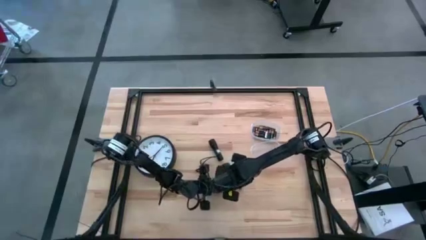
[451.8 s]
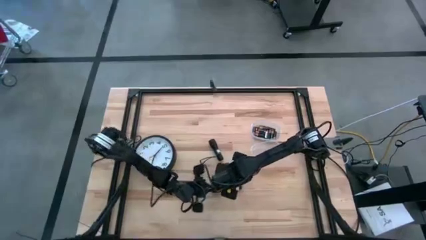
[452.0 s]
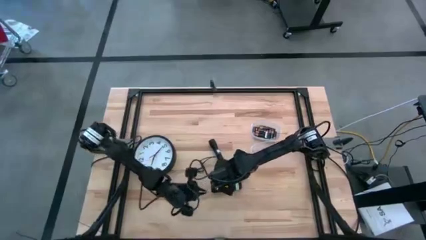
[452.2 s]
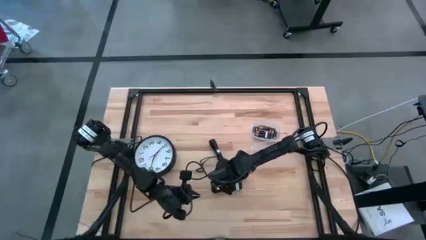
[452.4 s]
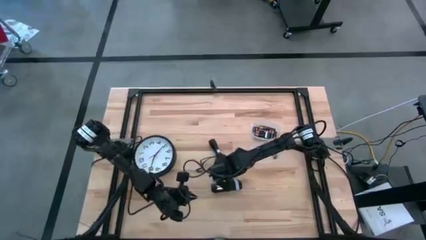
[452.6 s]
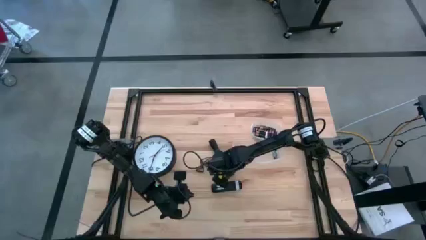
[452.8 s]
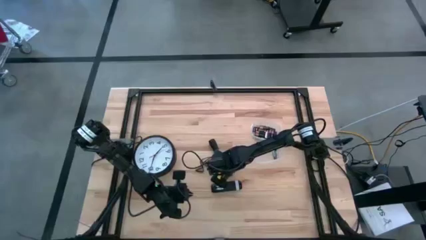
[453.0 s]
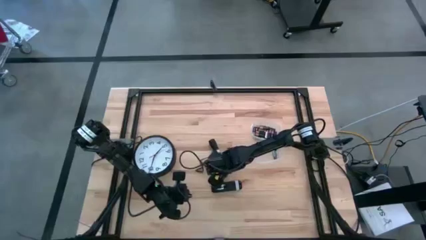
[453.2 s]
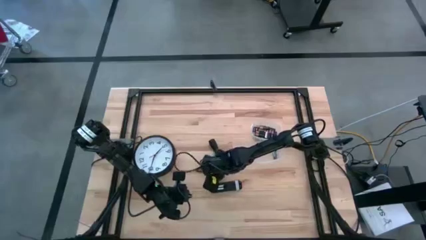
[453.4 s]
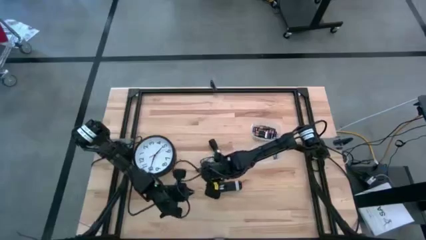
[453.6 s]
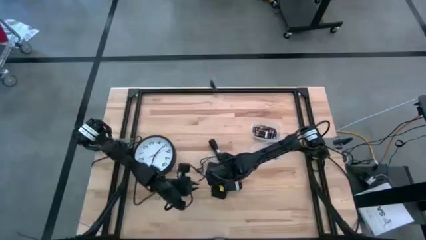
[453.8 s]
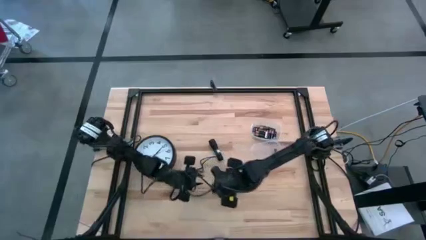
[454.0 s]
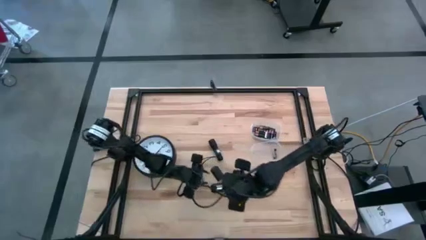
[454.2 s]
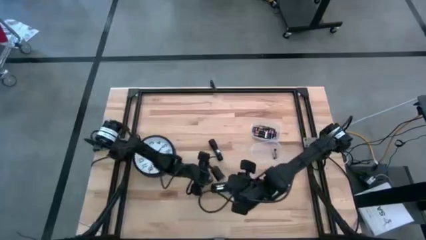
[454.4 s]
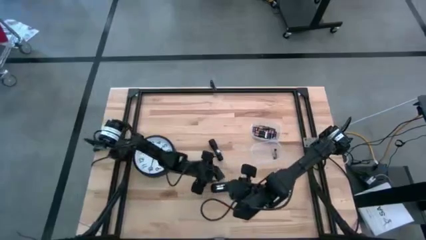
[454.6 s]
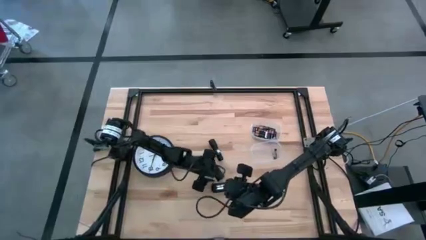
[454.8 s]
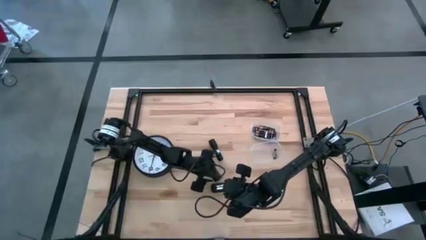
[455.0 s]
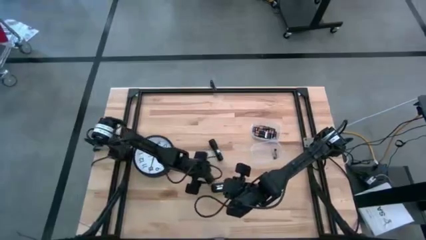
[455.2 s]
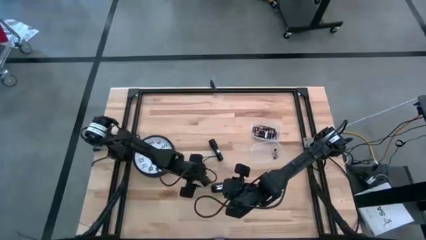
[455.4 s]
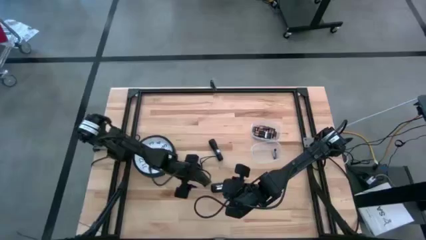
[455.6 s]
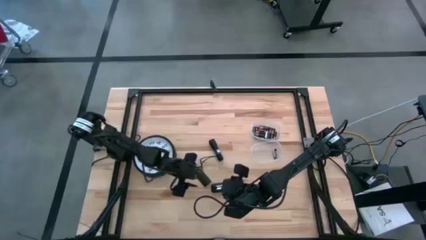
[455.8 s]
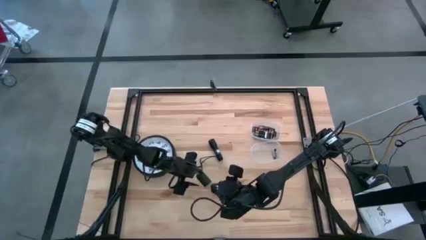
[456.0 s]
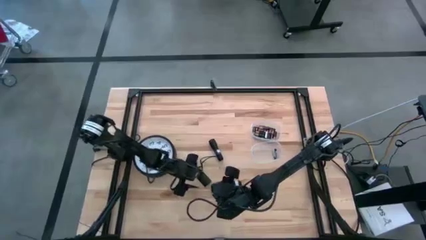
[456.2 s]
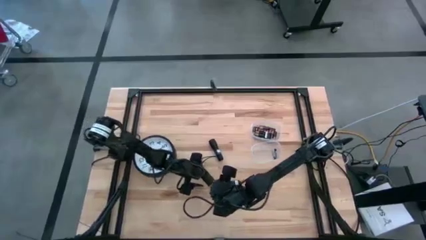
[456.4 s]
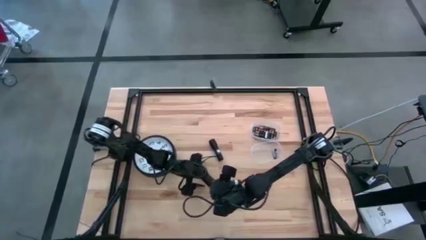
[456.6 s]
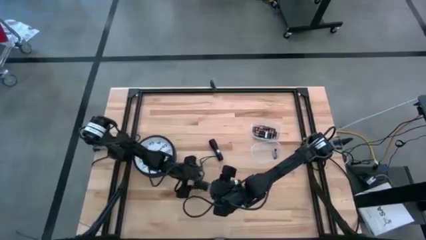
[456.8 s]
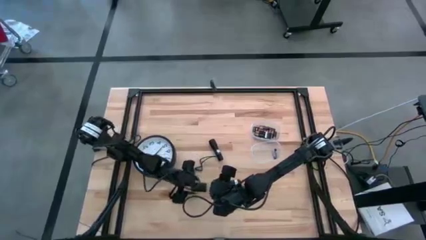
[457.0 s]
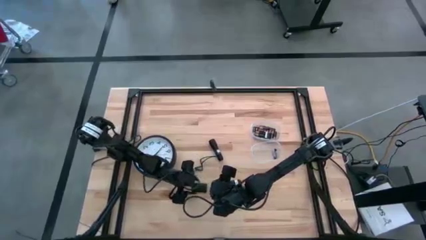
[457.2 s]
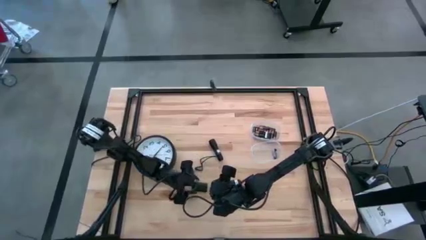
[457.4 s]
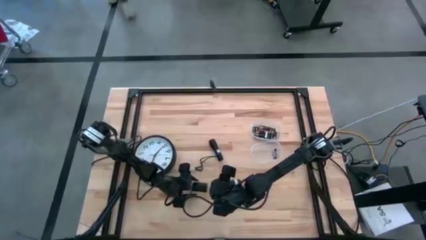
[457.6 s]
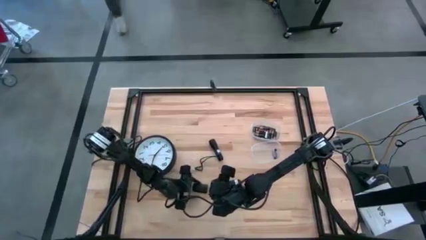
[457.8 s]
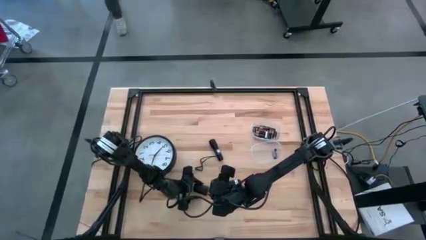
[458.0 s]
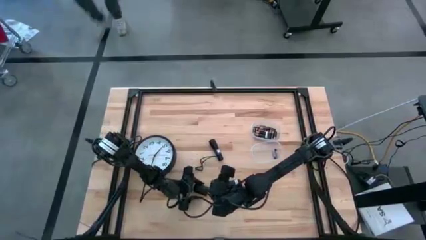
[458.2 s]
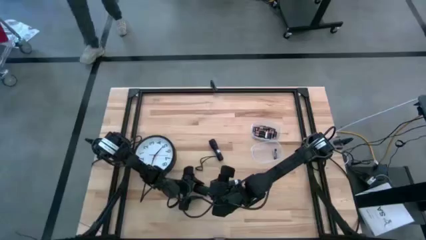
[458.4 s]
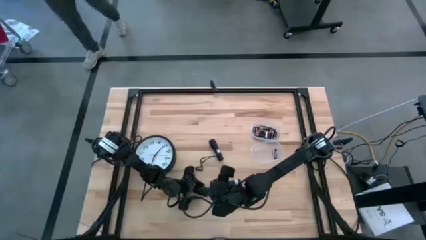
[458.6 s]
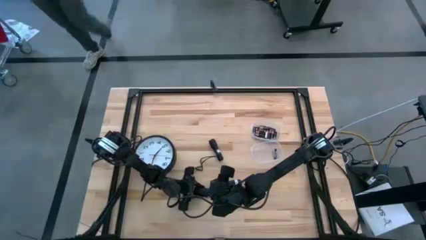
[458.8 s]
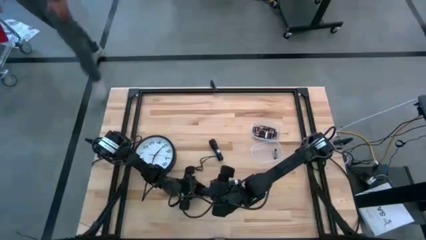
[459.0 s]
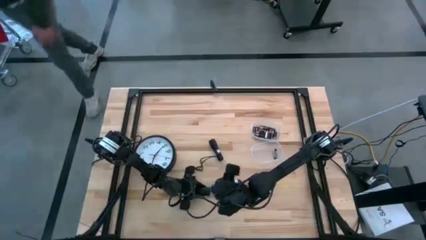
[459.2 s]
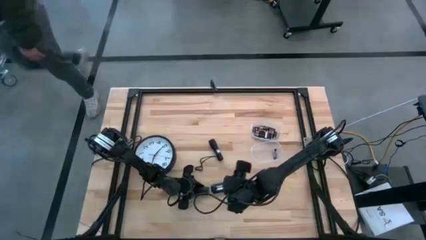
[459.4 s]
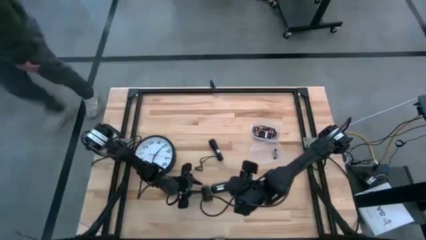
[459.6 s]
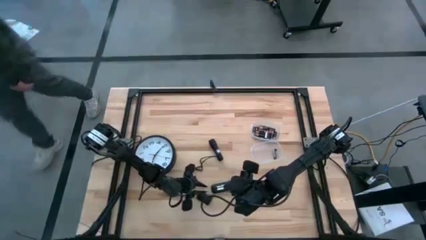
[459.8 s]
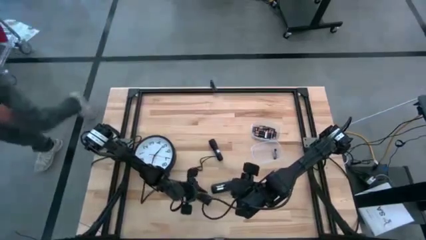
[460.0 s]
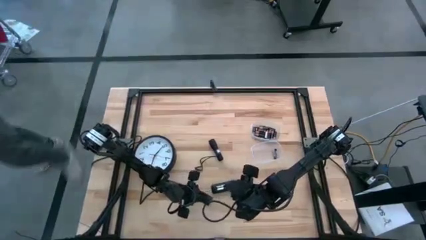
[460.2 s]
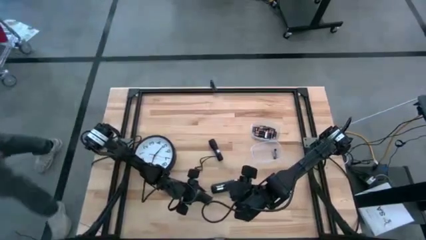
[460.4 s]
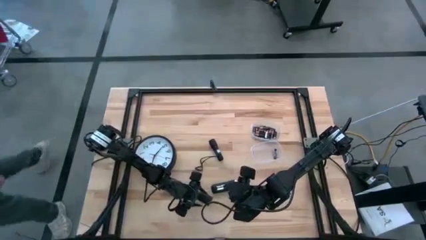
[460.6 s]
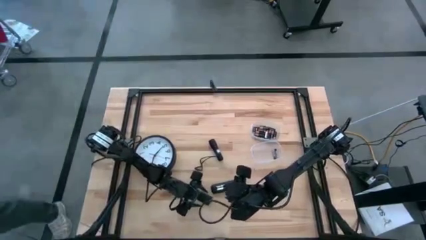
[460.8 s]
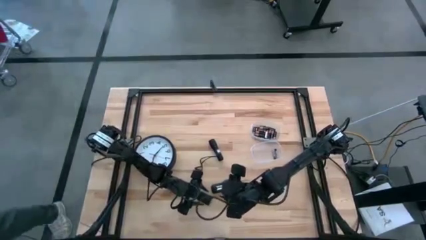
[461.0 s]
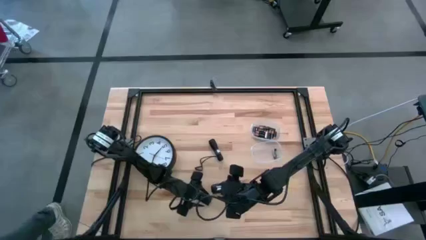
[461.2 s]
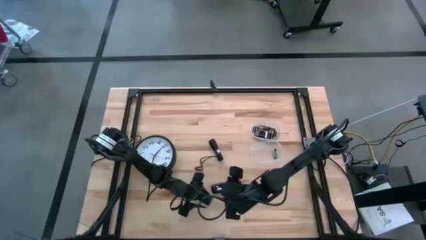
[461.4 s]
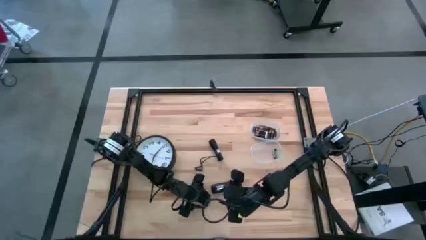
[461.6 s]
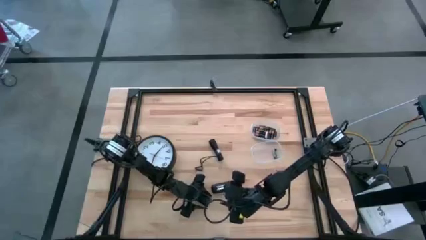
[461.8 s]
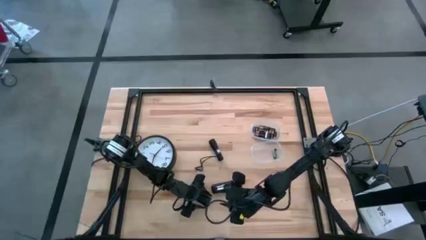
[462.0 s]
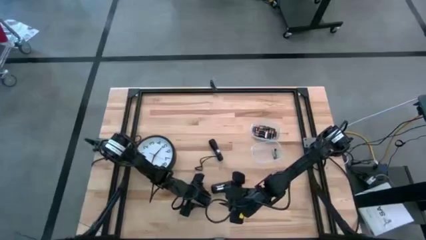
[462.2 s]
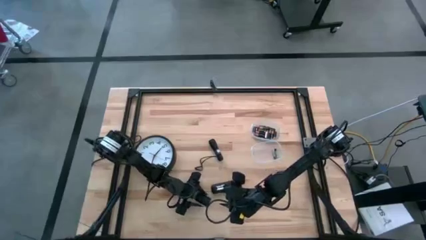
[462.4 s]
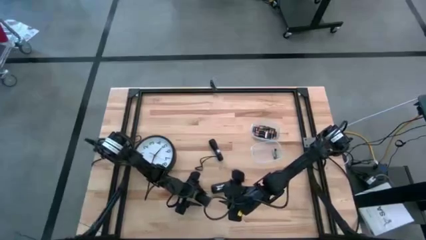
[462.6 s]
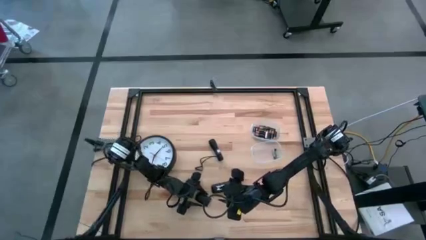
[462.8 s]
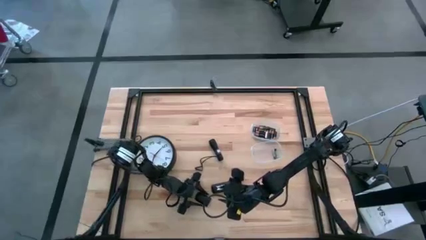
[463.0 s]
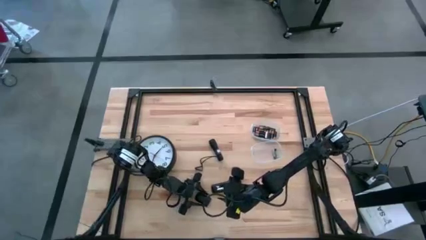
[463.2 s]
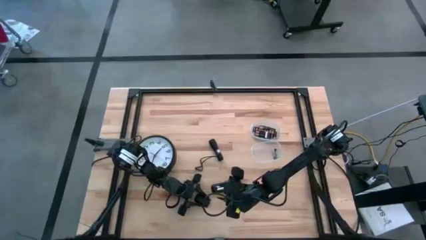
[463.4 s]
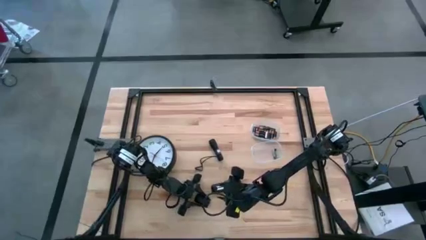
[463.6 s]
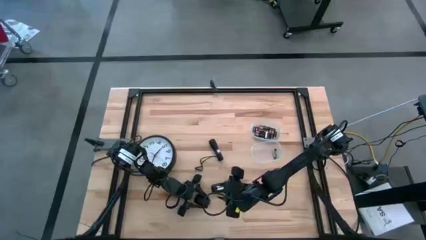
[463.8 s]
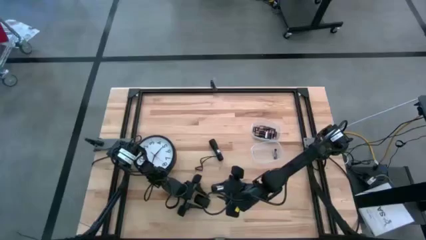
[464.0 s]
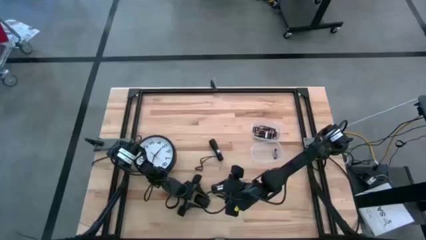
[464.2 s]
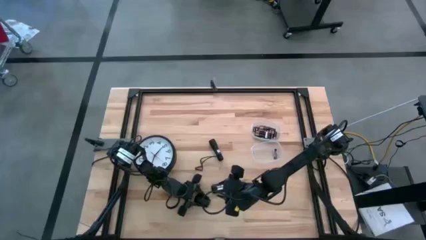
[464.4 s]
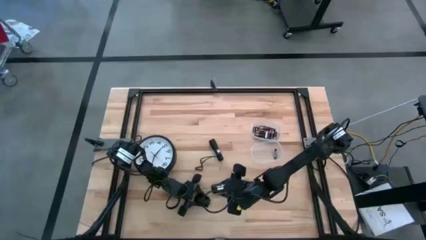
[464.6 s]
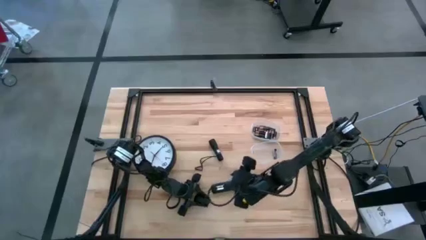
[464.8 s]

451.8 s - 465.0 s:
Task: Insert battery
Close the remote’s battery compartment cover

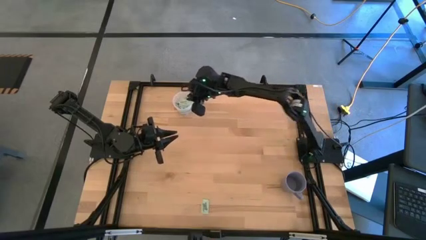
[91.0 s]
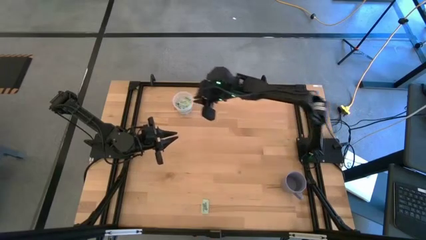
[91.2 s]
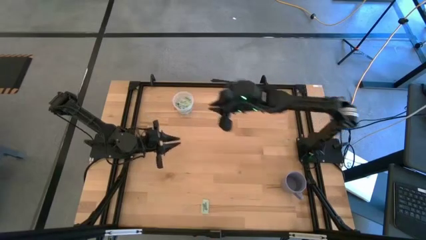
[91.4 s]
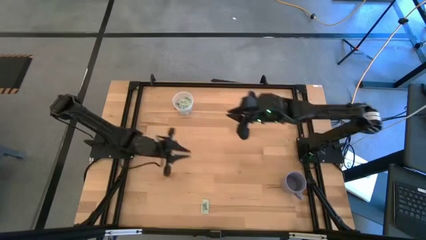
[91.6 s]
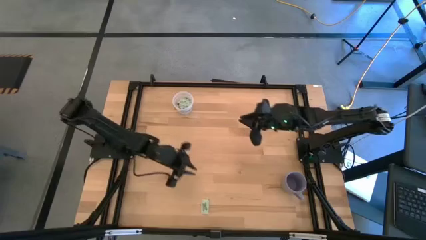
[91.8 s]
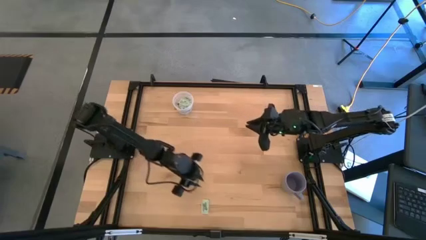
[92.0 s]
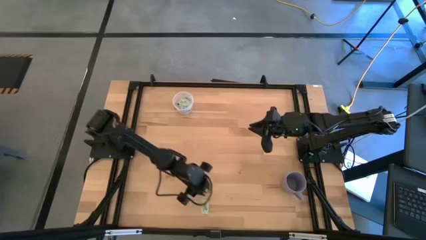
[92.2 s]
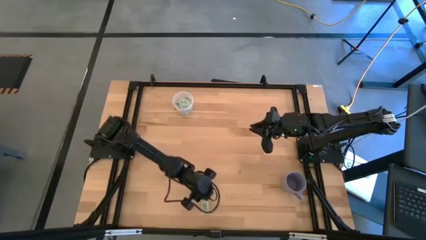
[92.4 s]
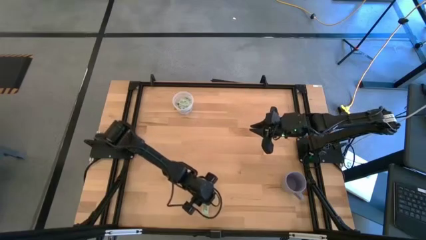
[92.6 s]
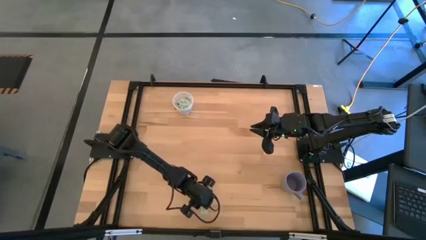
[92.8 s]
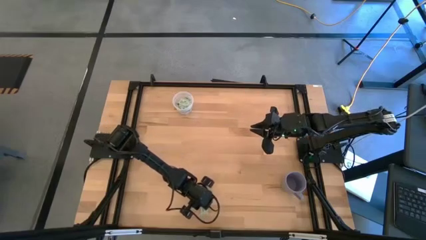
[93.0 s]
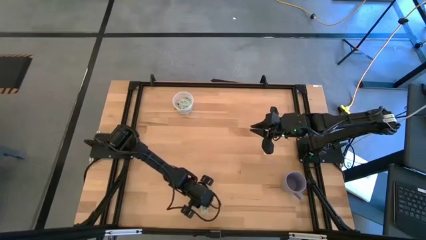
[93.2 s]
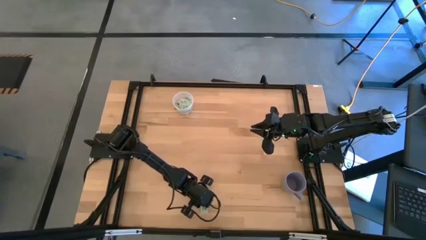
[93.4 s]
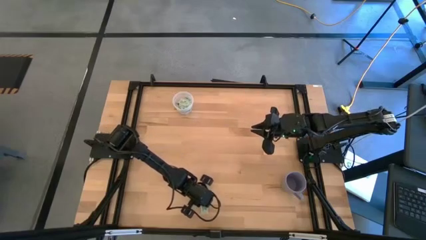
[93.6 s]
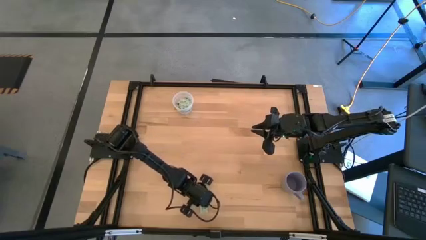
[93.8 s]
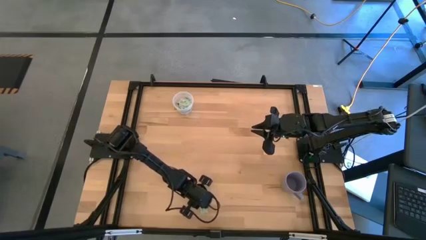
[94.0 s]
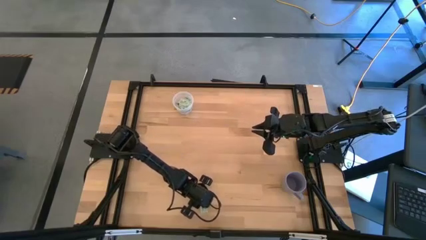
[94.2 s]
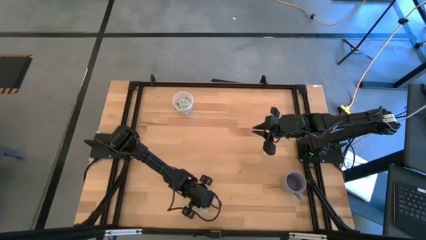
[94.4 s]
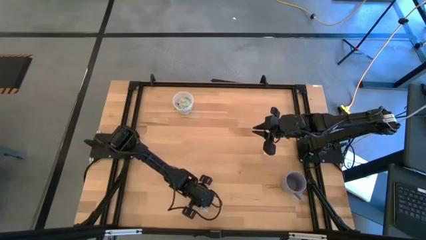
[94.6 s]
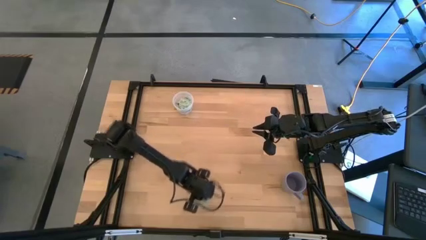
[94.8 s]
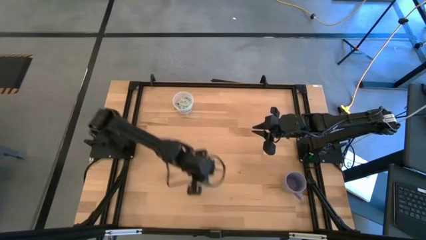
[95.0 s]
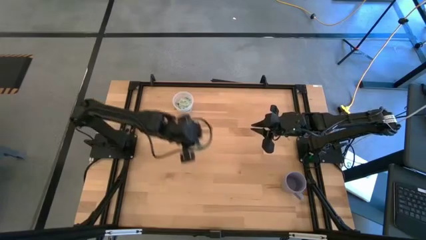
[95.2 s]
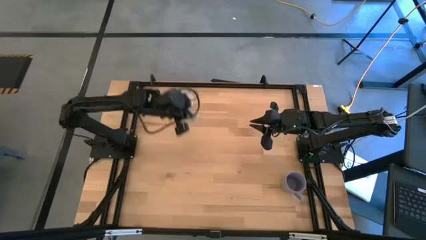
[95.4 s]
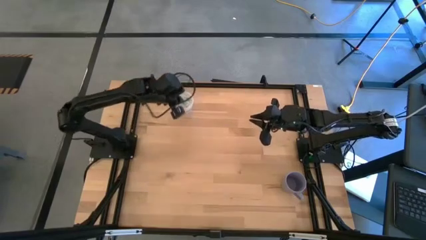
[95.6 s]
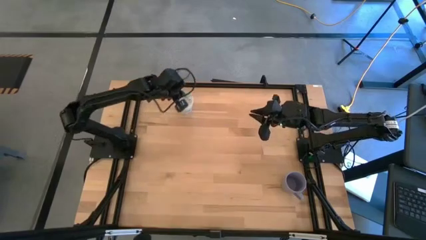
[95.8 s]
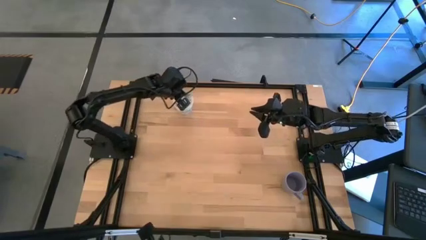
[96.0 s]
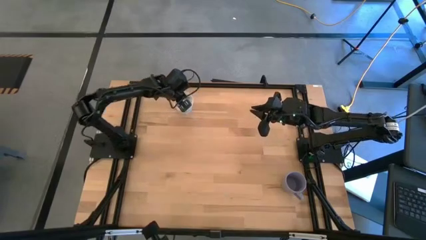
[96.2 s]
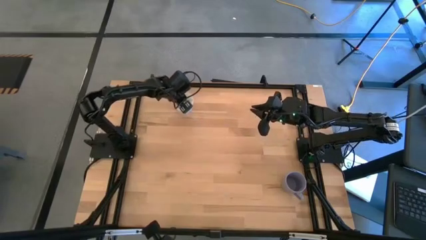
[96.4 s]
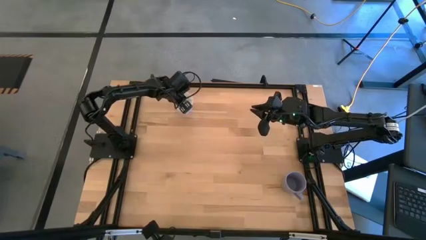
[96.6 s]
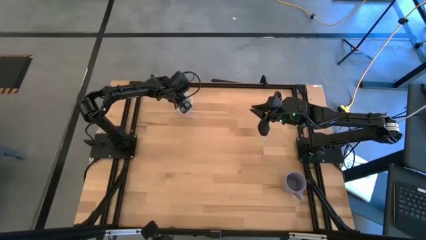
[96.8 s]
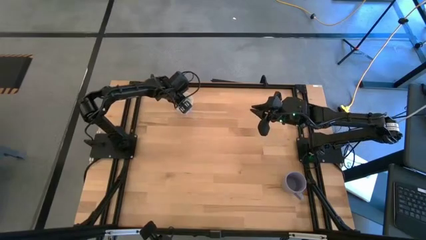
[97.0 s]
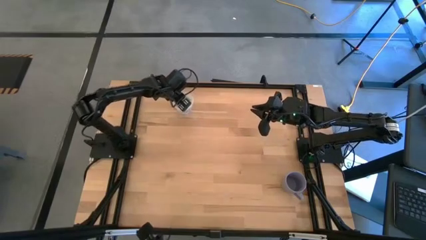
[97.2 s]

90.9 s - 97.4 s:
Task: Pick and place items into bin
Put the stevia packet into the transparent bin
